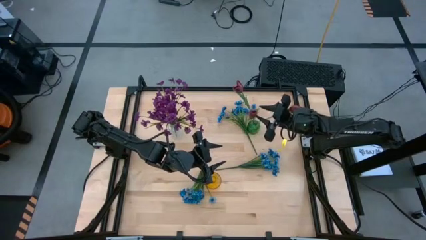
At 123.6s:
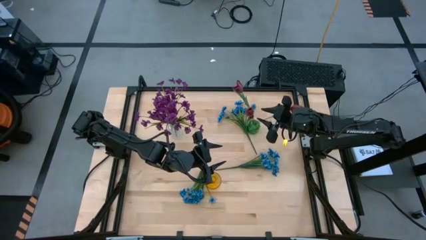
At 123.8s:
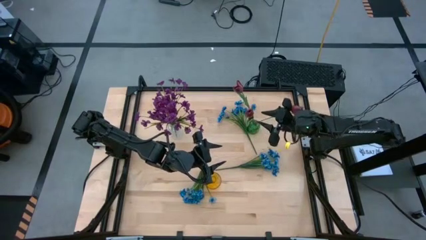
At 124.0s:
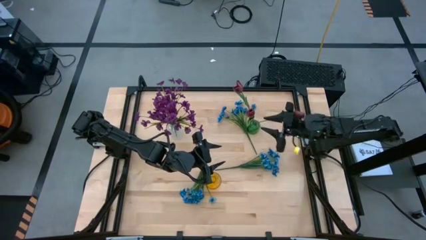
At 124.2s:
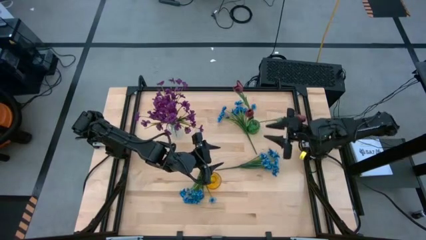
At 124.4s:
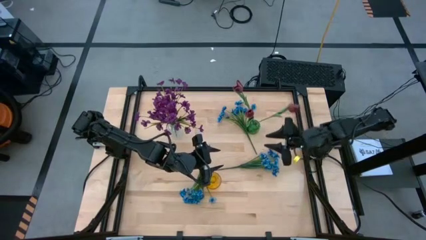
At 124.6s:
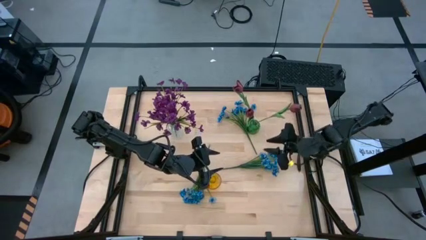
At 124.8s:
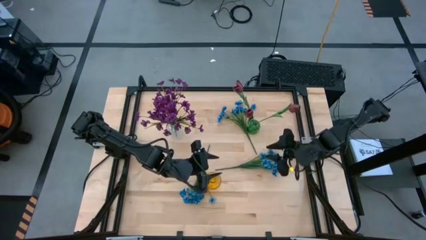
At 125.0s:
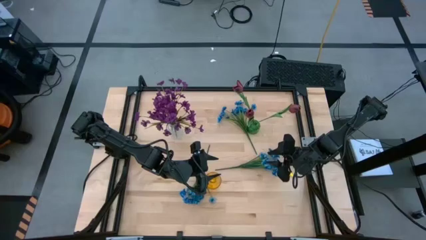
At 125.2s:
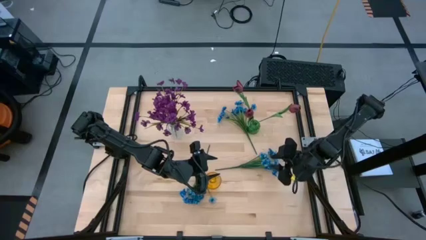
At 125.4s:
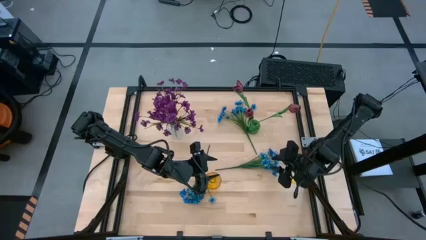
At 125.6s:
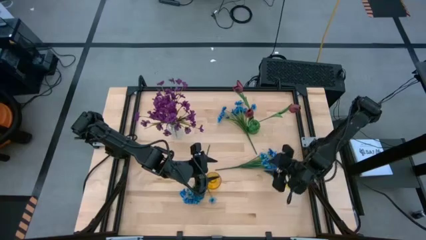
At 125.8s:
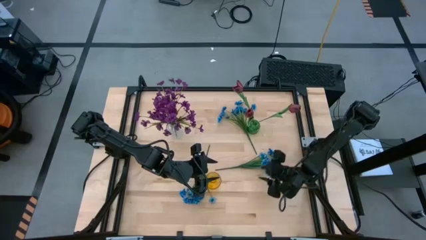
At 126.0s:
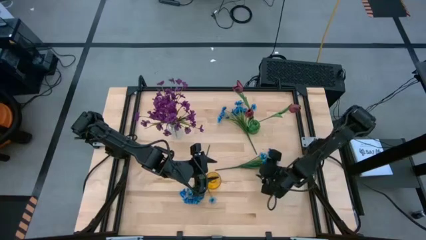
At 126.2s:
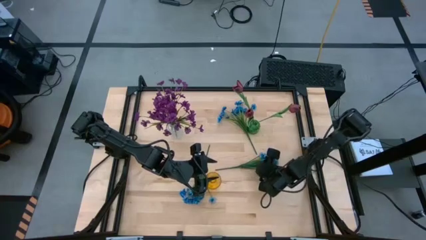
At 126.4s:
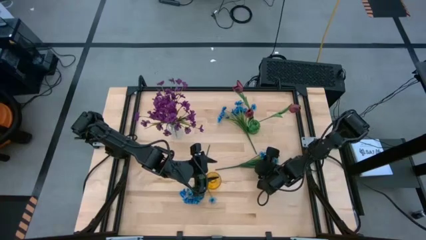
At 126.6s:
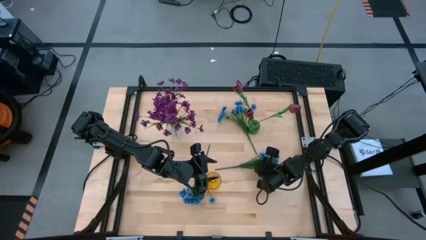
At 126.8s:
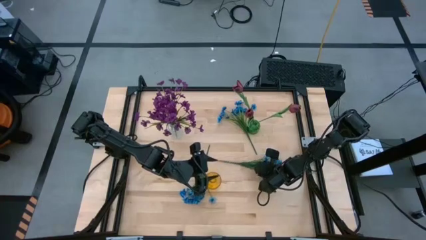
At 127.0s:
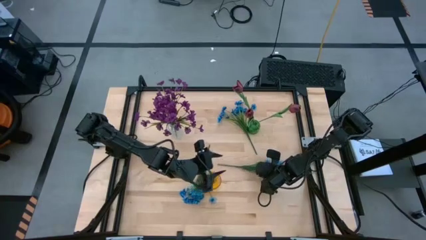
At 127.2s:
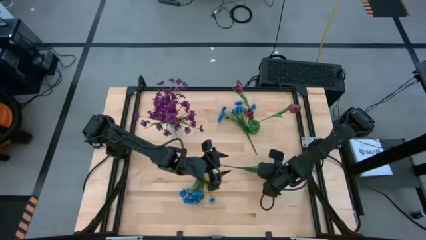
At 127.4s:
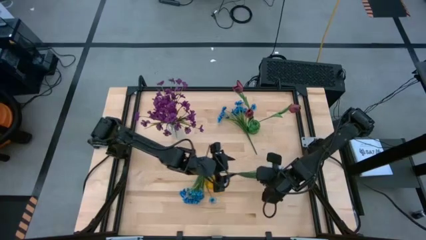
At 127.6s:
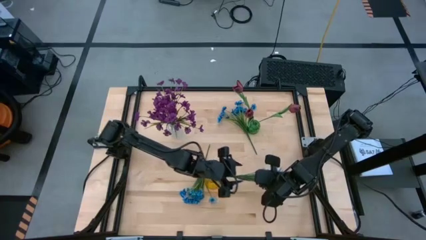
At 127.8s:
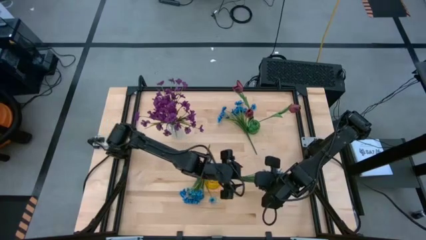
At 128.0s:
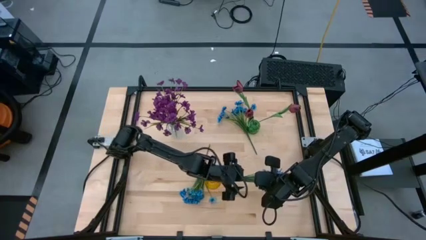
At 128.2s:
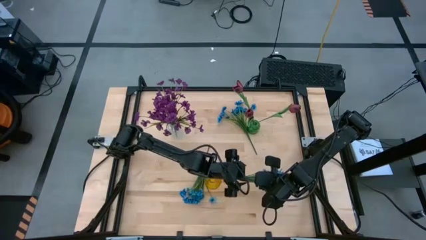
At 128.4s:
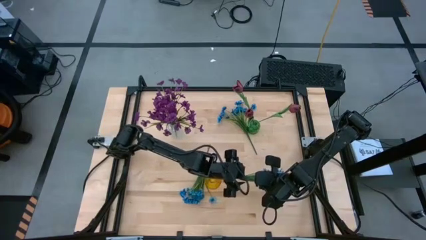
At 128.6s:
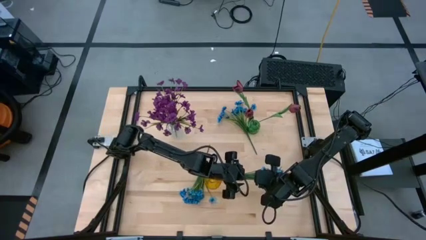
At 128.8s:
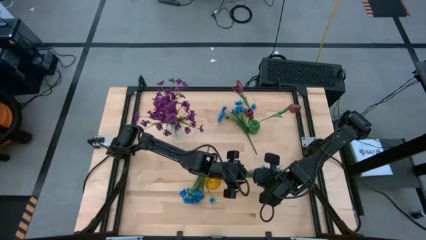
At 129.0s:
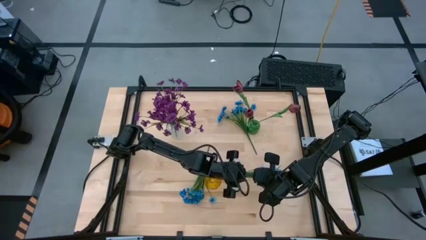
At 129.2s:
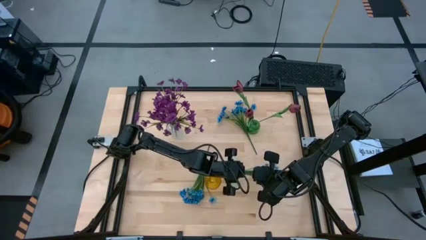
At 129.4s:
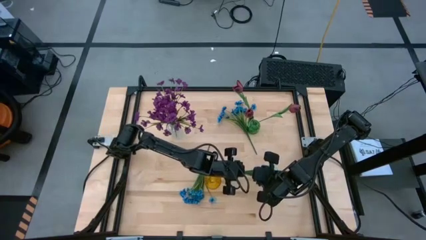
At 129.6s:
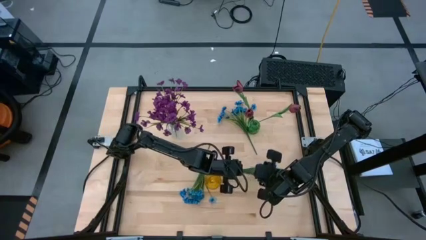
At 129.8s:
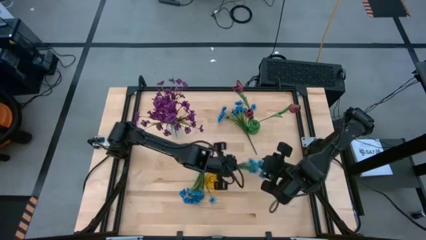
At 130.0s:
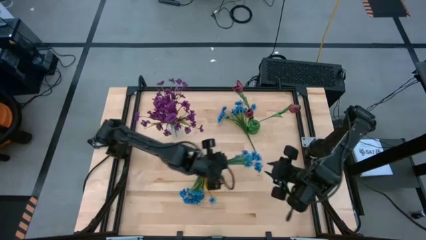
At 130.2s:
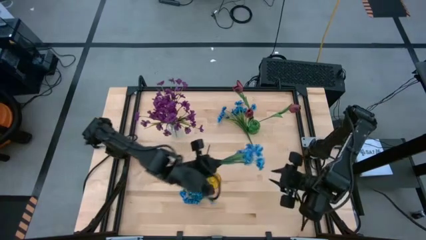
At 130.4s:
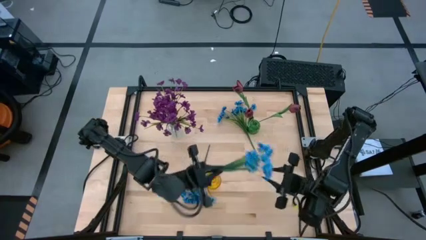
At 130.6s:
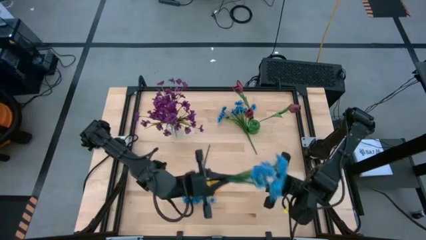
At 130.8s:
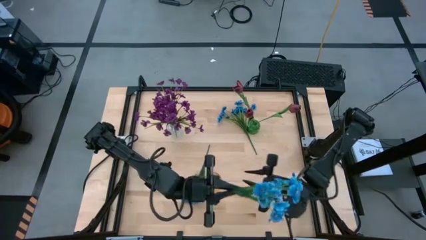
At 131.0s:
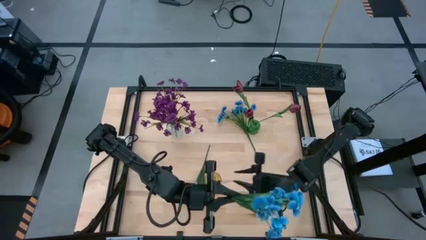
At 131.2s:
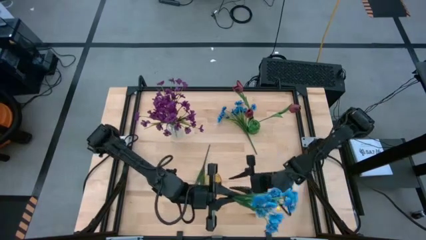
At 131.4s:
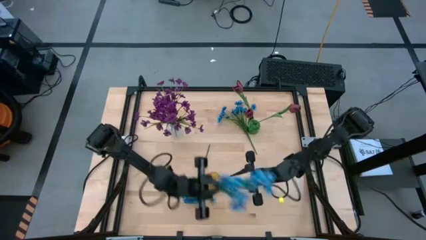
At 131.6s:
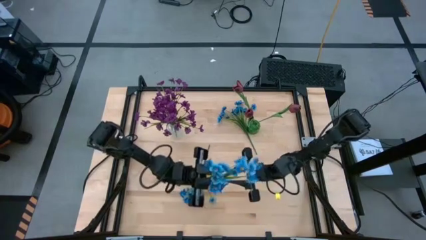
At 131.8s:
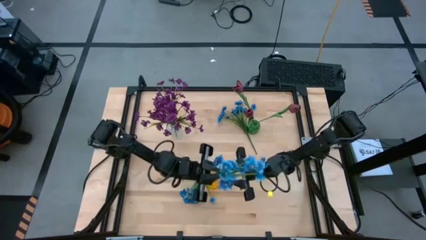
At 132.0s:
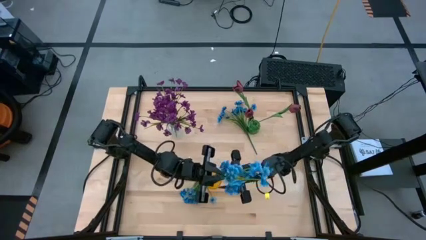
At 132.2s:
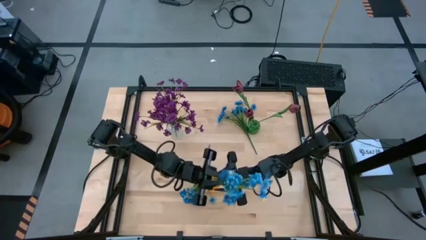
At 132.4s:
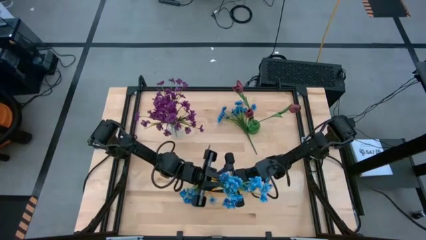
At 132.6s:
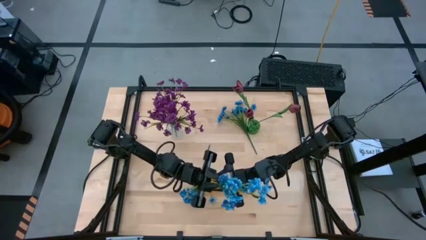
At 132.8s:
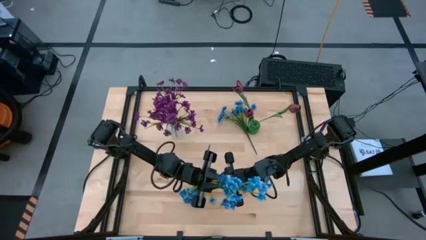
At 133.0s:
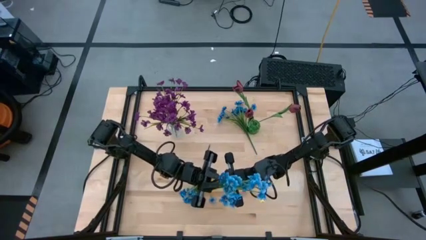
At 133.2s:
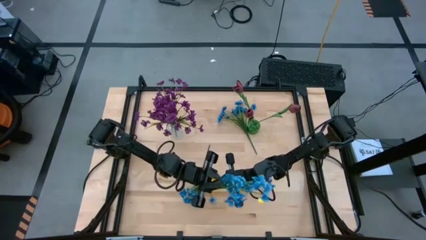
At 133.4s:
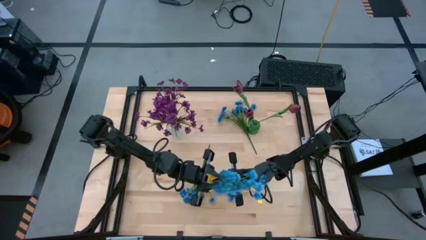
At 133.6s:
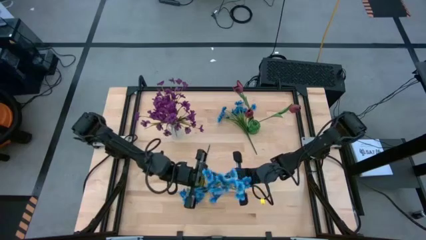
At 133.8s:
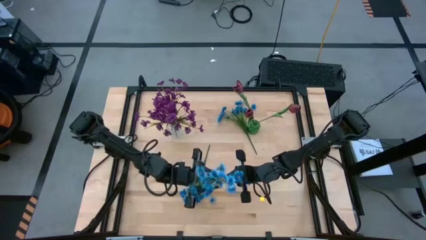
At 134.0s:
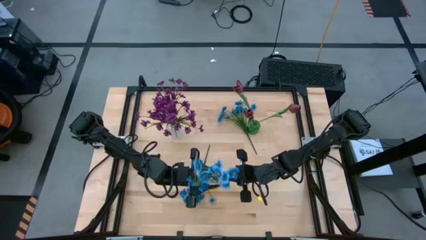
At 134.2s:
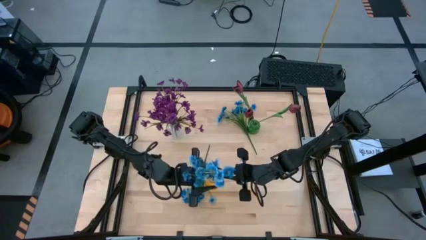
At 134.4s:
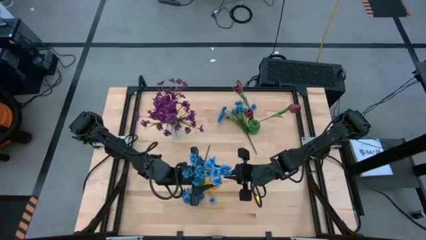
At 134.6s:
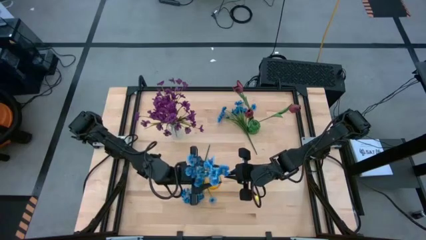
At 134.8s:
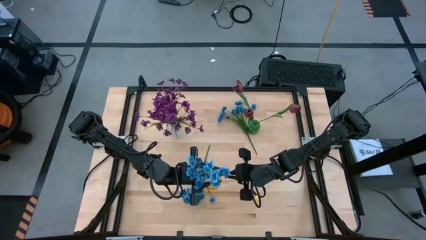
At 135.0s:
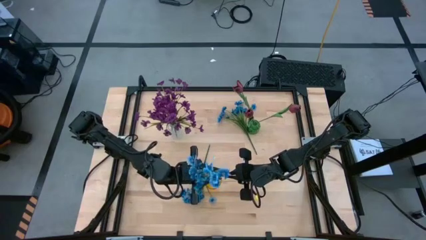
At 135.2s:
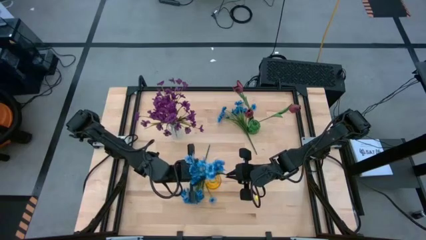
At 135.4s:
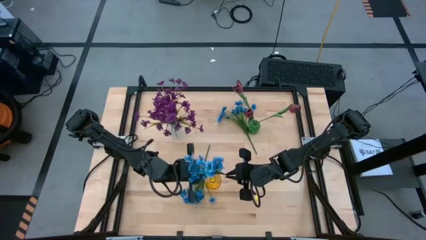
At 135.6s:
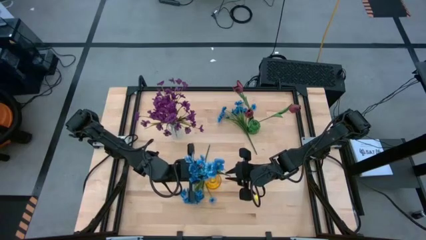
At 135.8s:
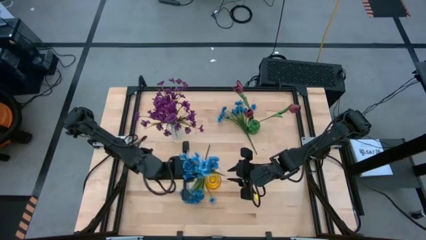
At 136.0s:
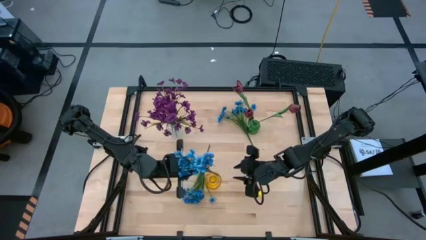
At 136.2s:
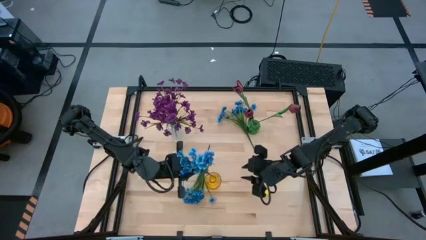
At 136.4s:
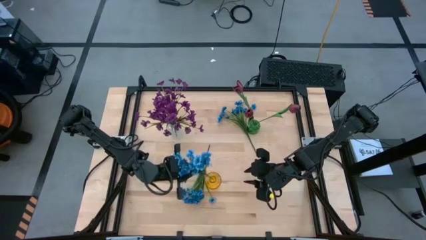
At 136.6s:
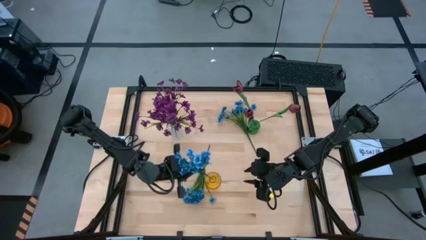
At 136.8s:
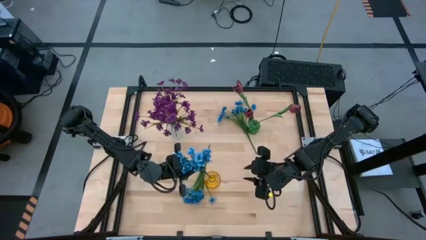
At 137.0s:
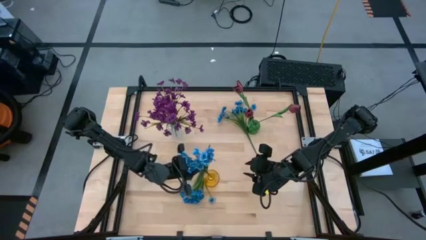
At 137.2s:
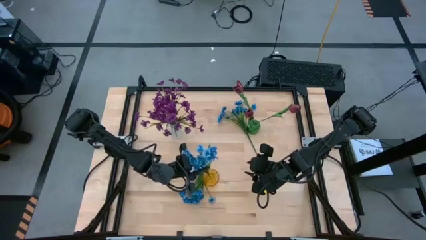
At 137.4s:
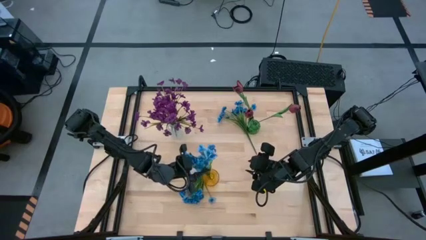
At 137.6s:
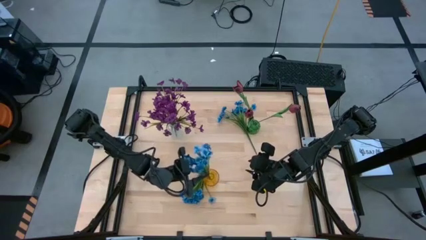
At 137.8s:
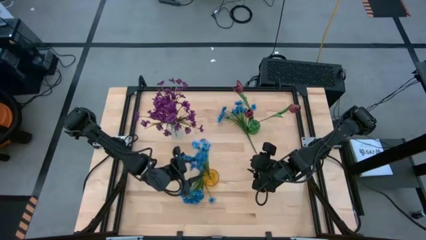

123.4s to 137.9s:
Task: Sort flowers into vase by color
Put the middle right blue flowers into the yellow vase

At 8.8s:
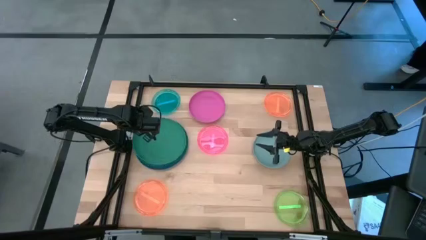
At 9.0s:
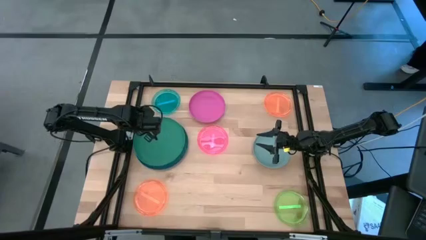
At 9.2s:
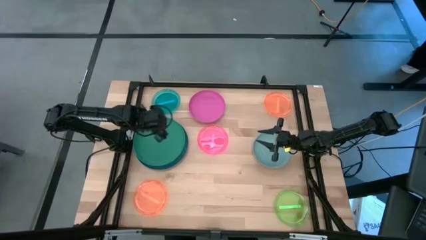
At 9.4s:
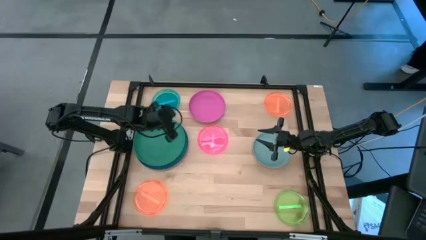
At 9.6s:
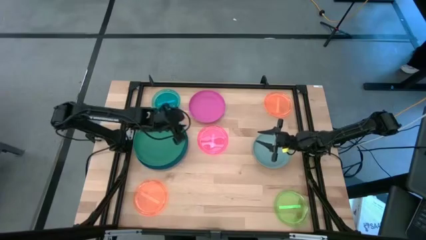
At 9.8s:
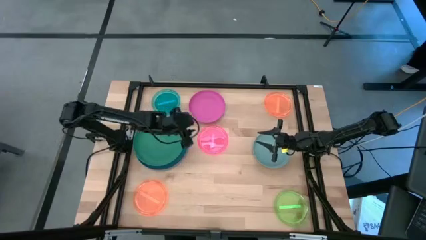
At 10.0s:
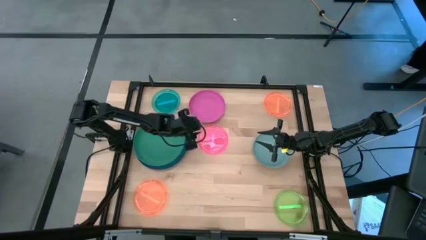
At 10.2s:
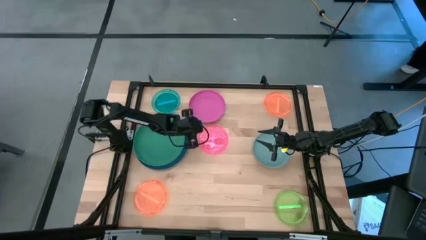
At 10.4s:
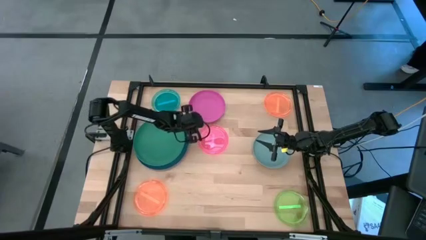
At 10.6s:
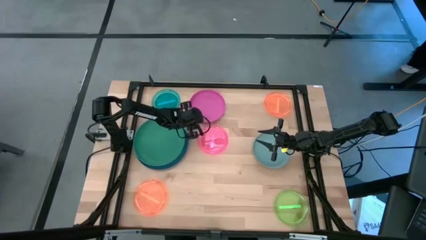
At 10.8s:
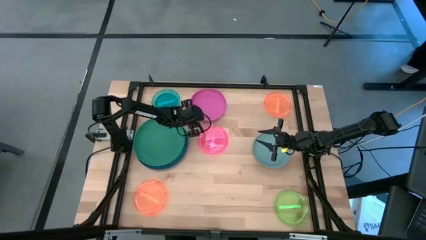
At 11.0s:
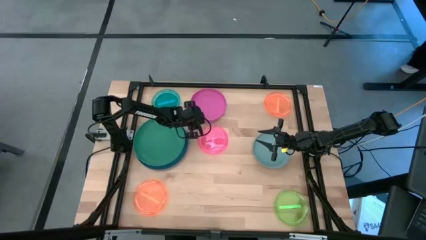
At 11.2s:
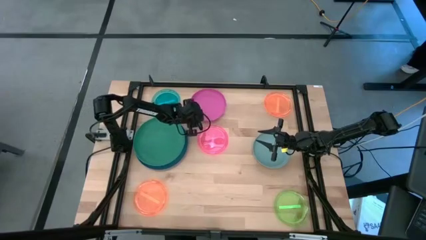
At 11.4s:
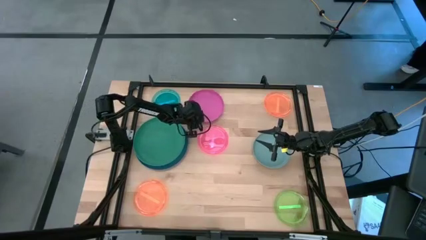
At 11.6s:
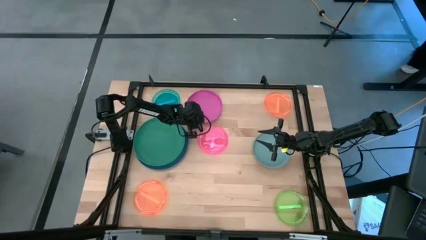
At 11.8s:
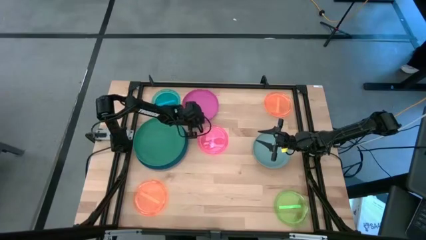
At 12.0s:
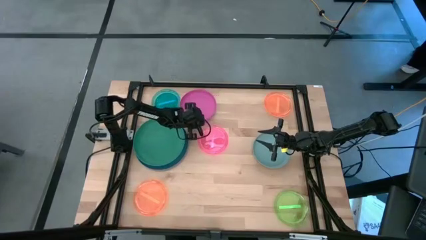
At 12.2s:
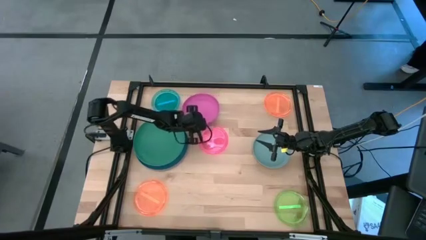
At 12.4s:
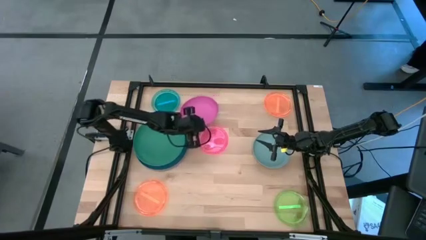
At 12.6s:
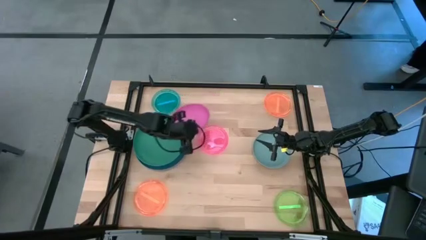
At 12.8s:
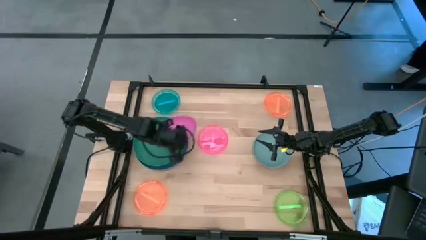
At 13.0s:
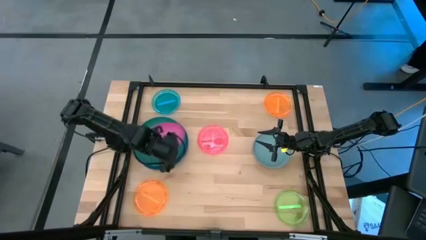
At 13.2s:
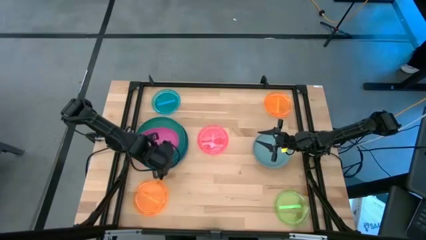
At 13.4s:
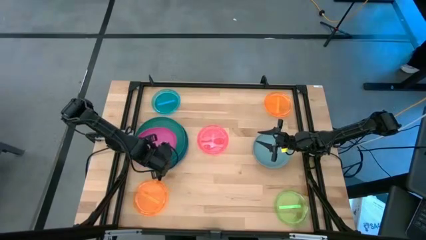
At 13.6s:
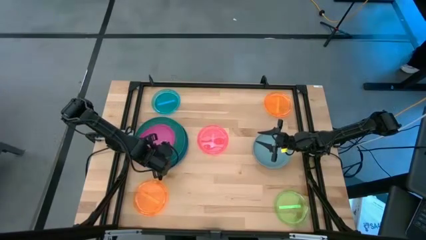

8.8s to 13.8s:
Task: Stack plastic plates
Stack the dark pink plate on top of the green plate
